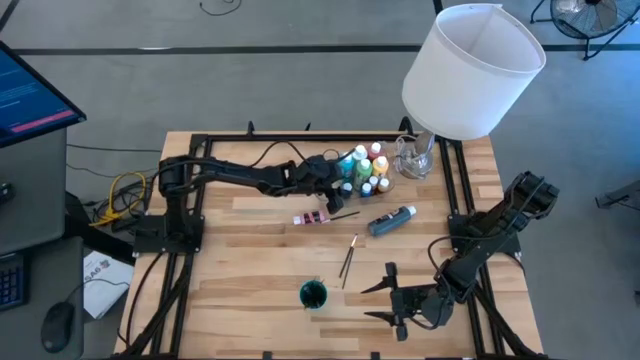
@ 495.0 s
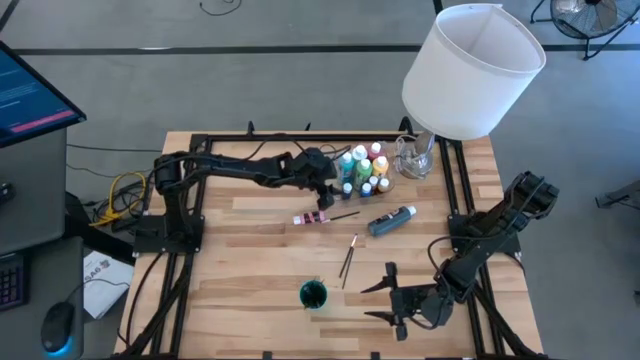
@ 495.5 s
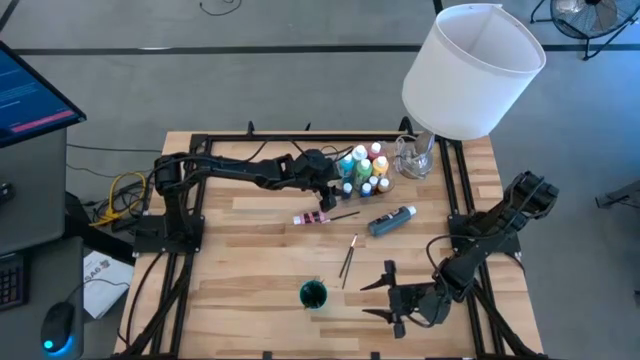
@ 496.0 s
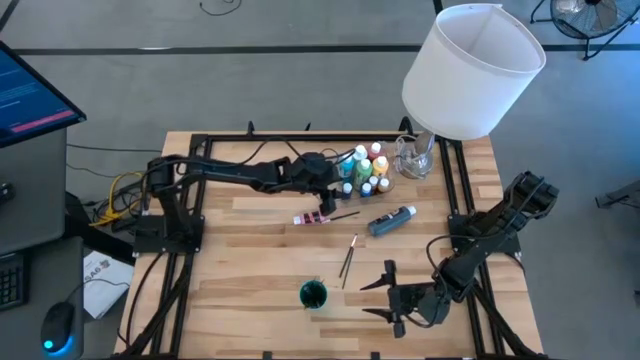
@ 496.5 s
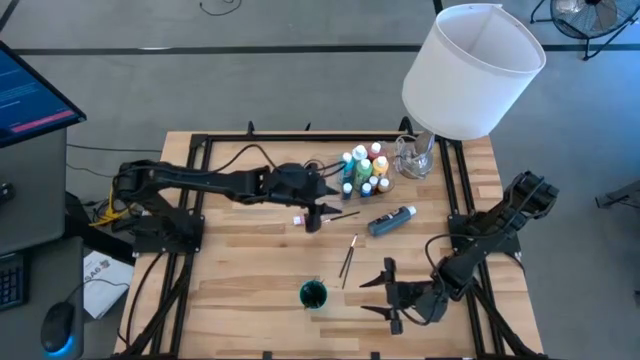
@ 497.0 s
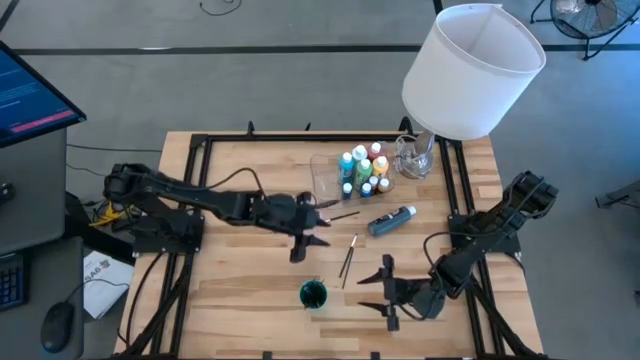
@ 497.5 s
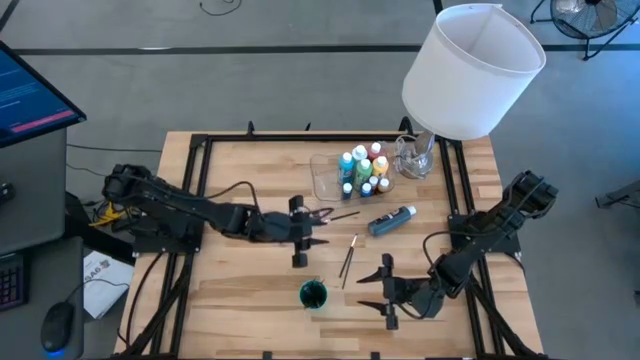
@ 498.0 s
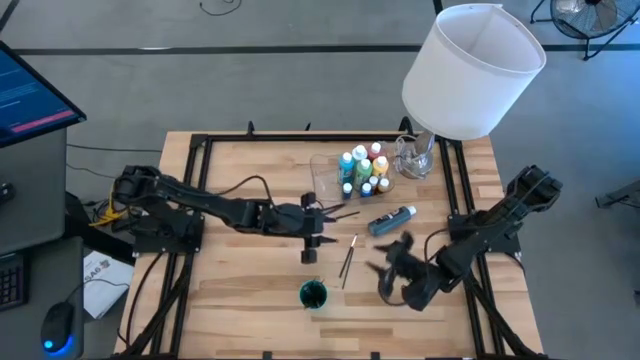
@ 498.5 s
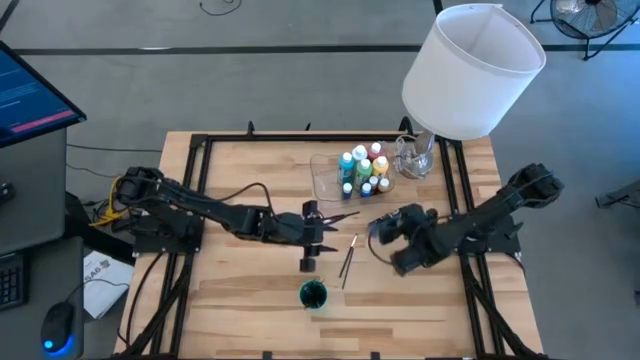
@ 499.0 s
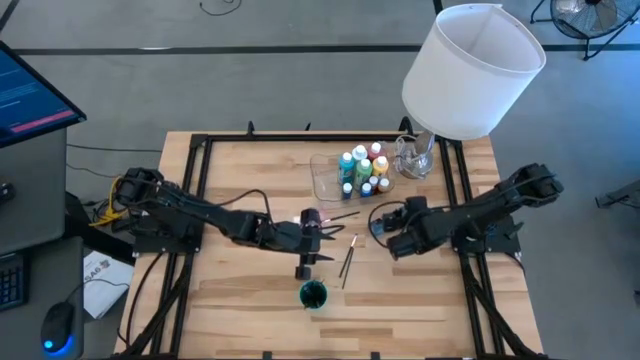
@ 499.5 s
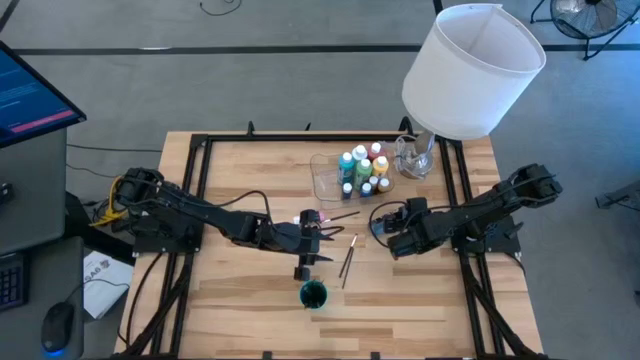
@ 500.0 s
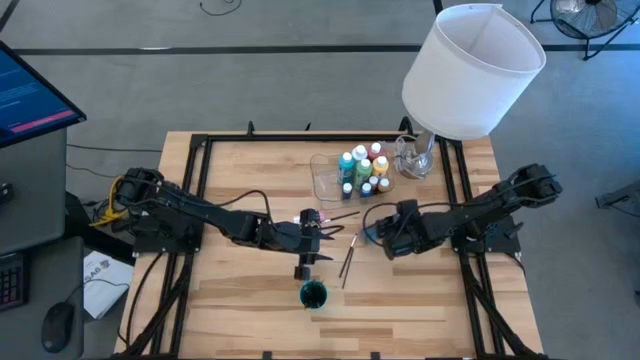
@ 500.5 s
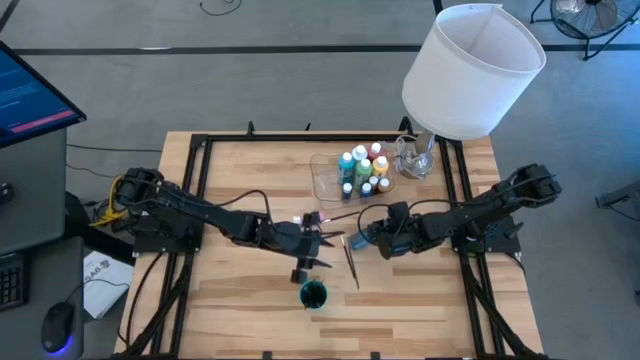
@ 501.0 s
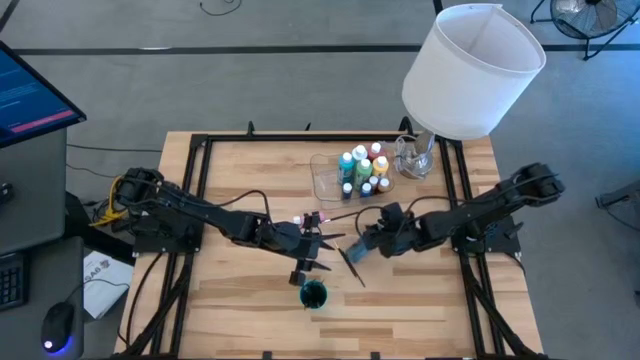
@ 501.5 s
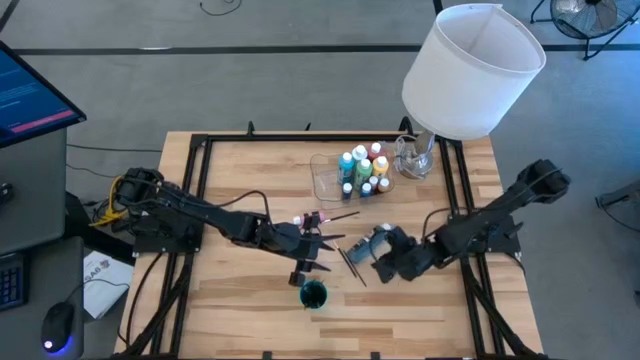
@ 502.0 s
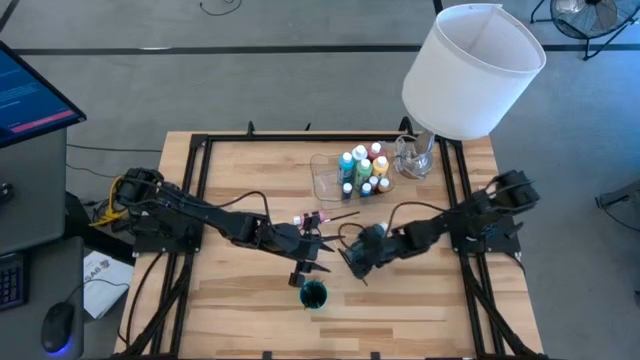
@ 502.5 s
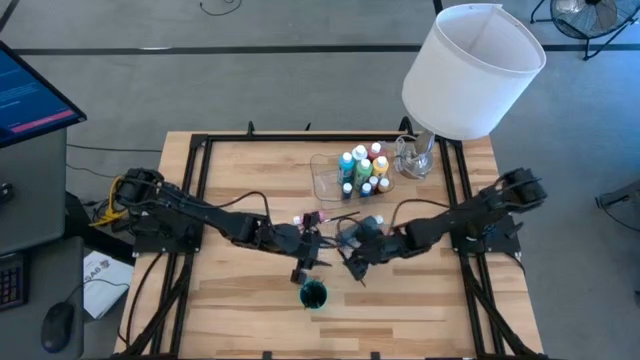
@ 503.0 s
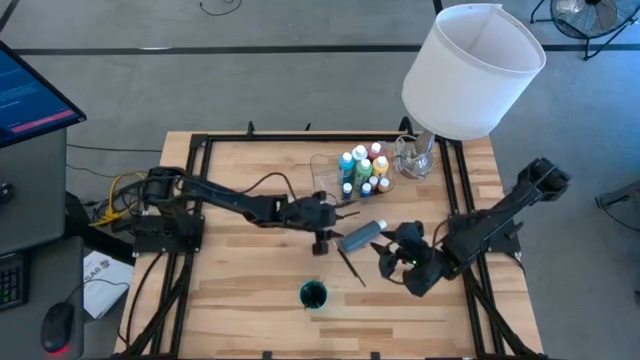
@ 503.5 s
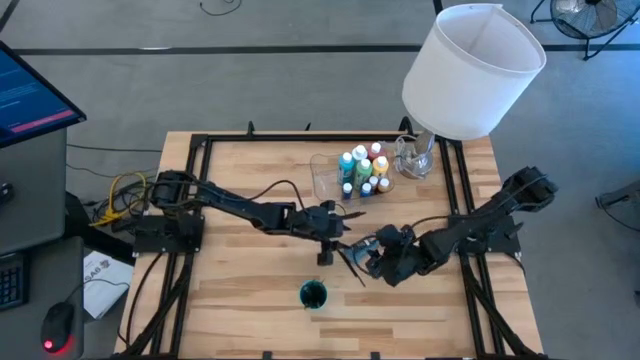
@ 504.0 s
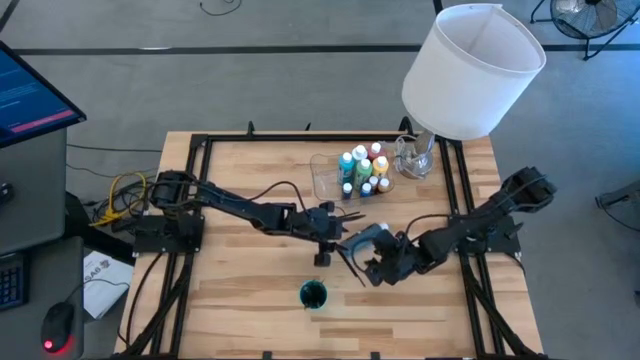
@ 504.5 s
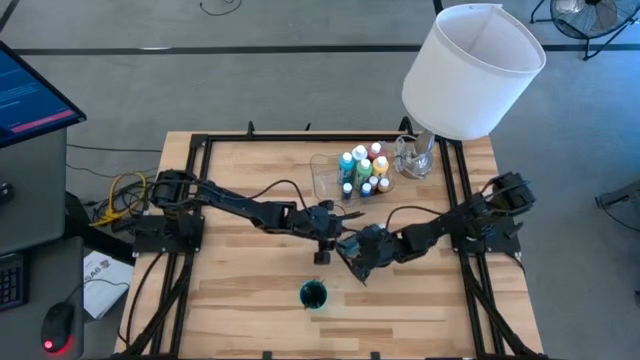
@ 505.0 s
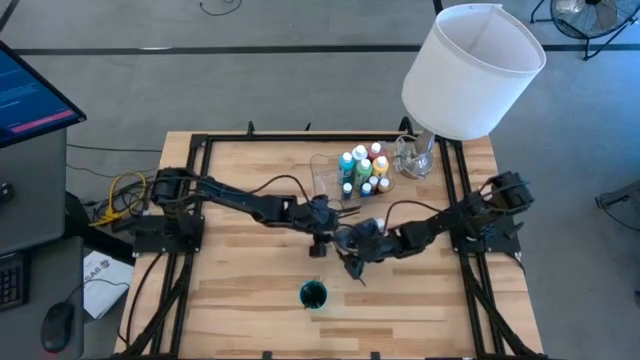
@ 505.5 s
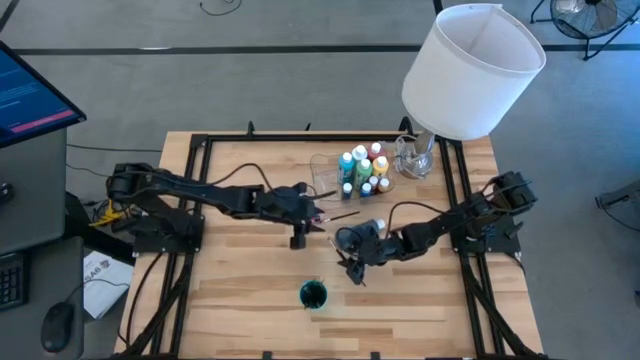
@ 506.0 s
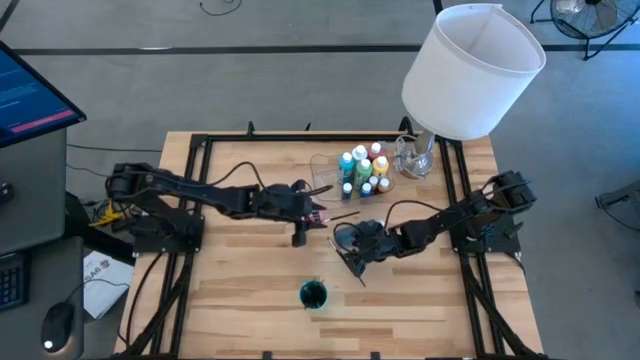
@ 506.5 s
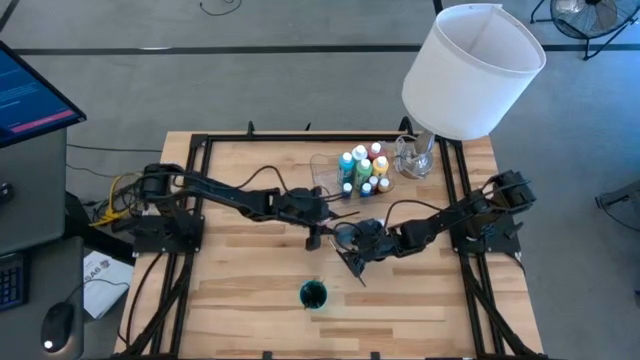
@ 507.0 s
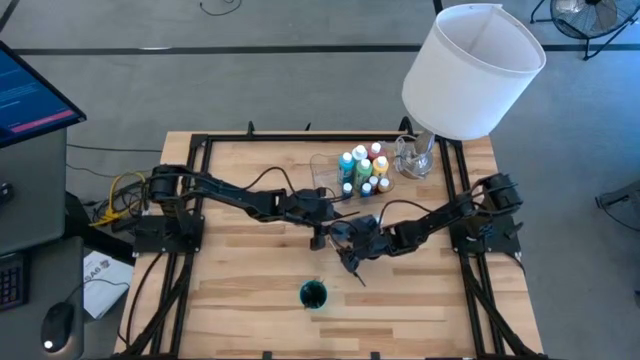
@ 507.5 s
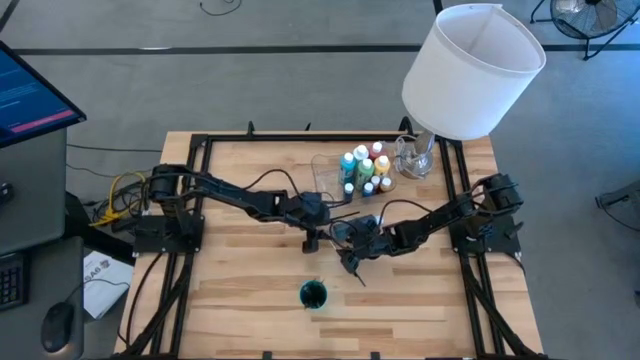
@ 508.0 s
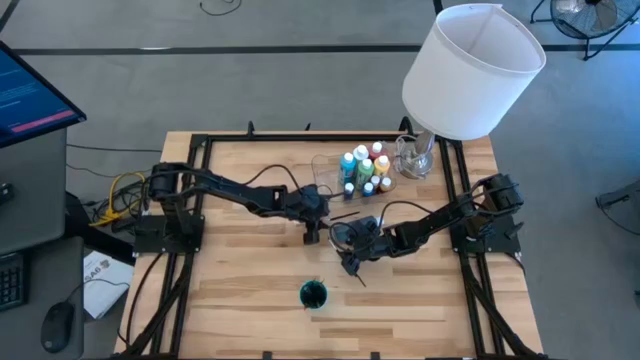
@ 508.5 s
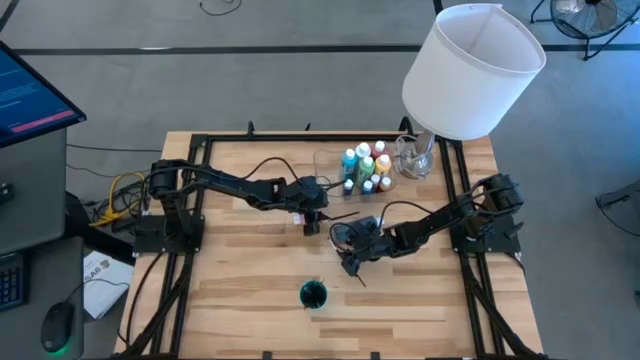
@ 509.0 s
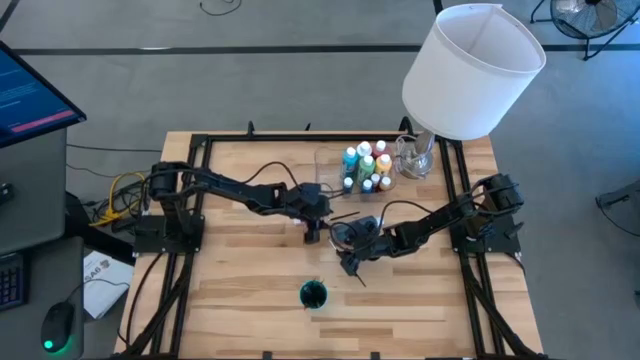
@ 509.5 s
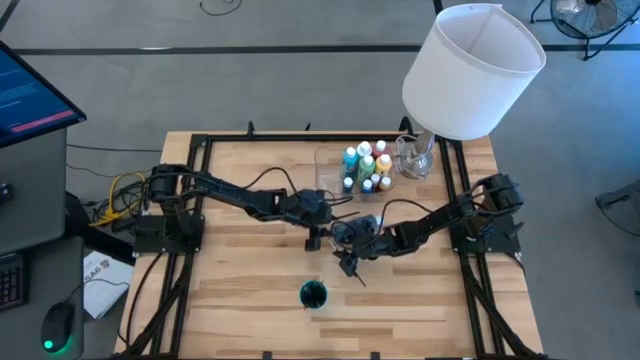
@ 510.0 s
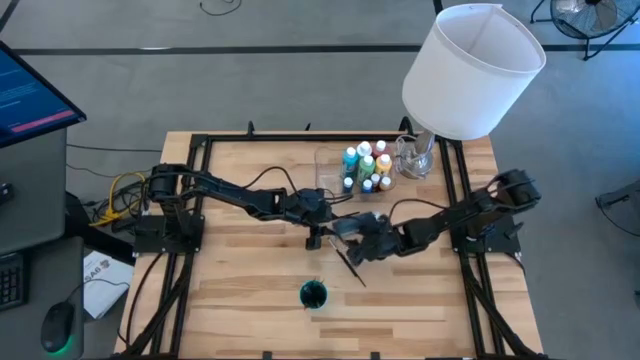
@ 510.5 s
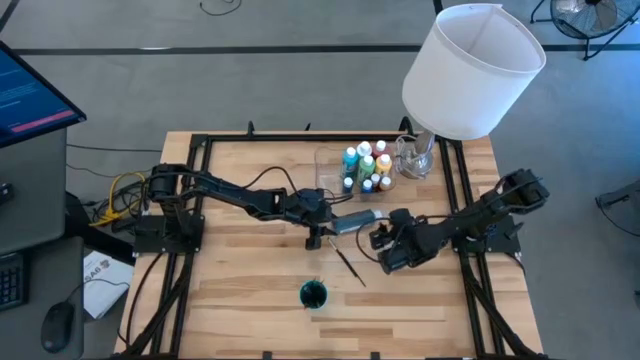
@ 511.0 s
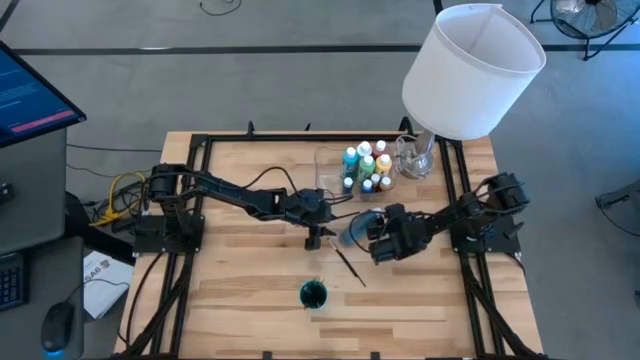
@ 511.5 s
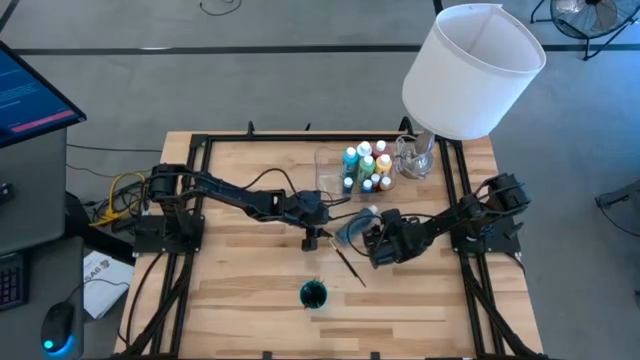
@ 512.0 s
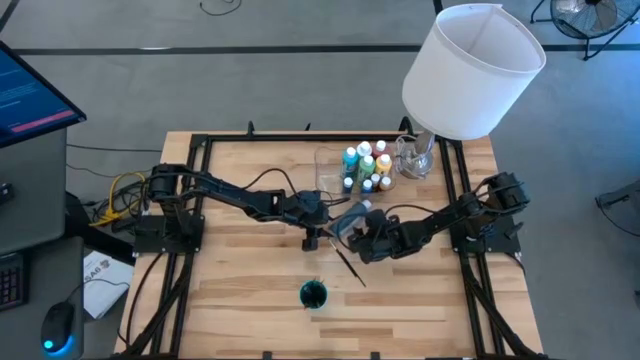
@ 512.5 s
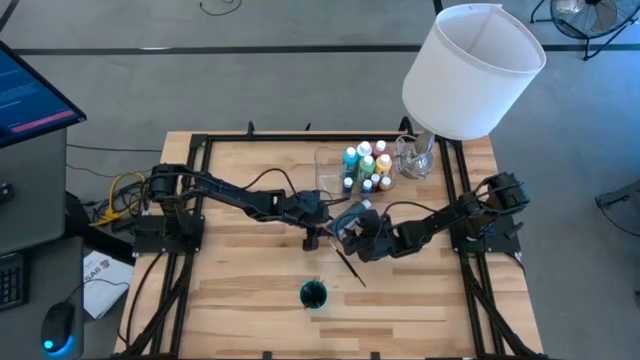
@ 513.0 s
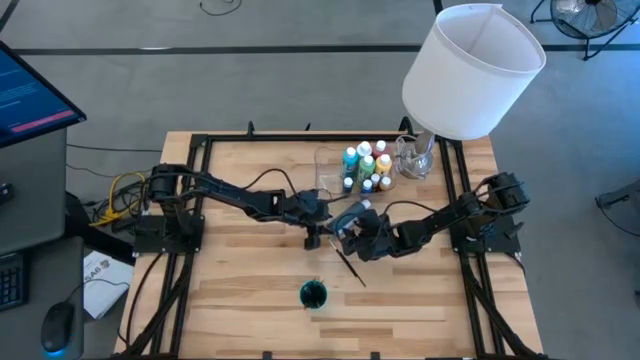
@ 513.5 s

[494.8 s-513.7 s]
Task: Pick & Place Paint Supplies
Put the big black paint bottle into the transparent bin
